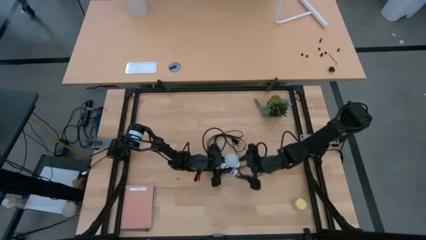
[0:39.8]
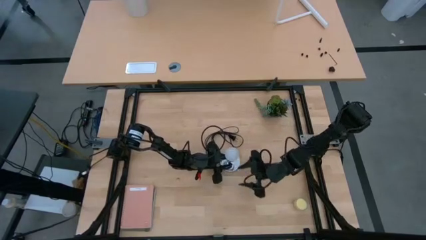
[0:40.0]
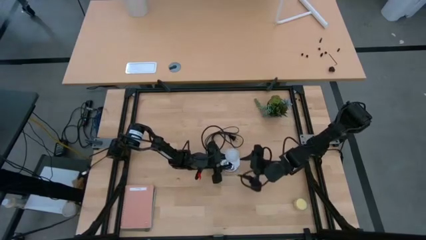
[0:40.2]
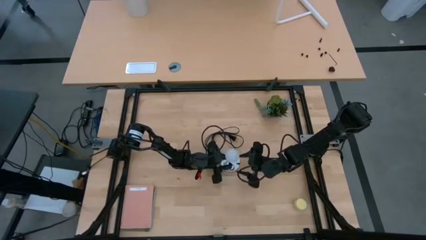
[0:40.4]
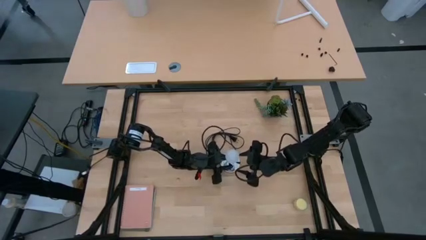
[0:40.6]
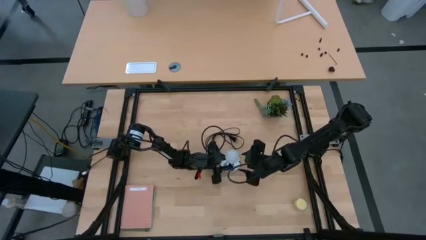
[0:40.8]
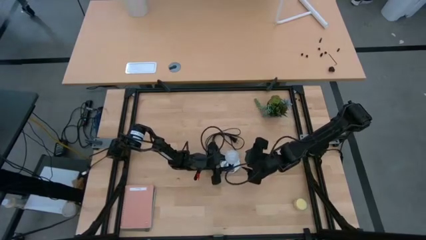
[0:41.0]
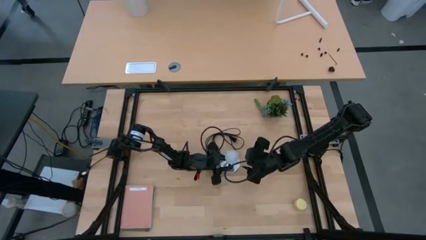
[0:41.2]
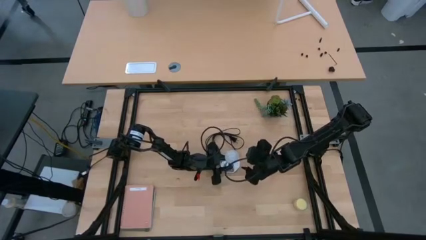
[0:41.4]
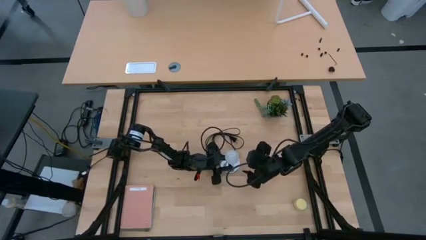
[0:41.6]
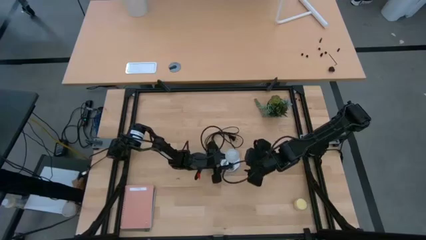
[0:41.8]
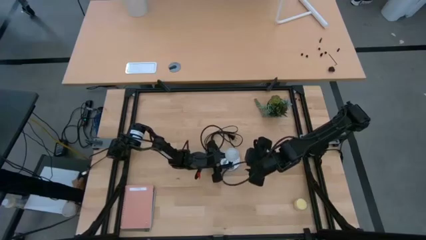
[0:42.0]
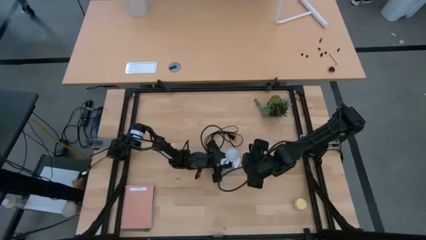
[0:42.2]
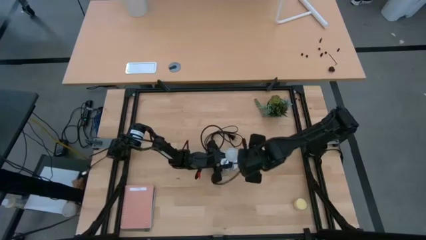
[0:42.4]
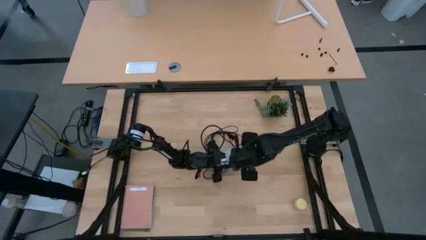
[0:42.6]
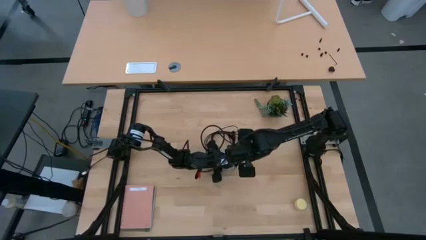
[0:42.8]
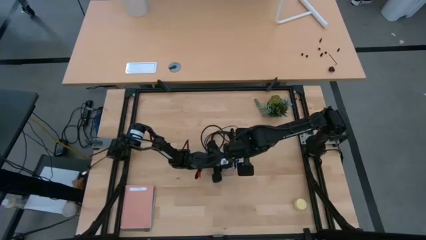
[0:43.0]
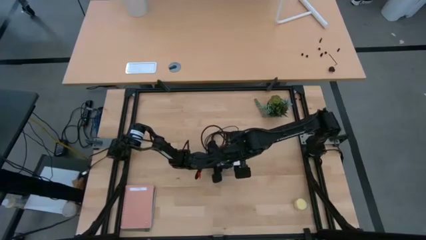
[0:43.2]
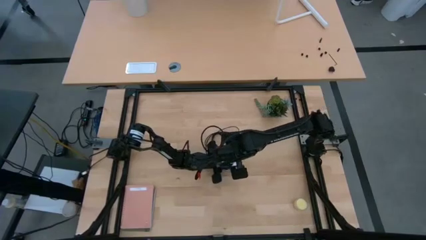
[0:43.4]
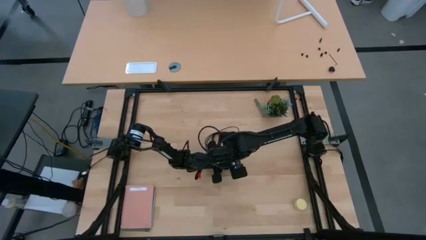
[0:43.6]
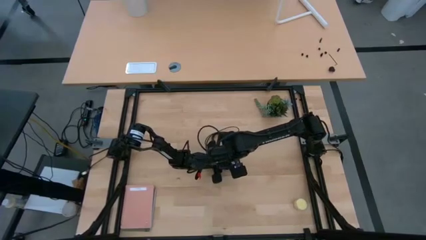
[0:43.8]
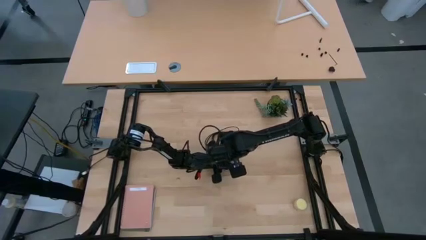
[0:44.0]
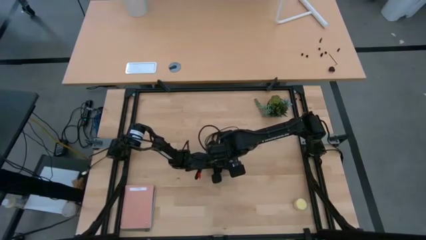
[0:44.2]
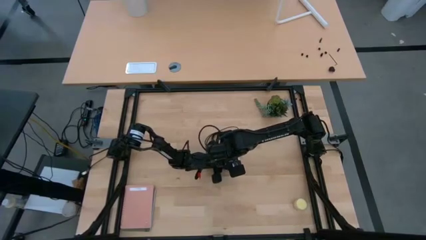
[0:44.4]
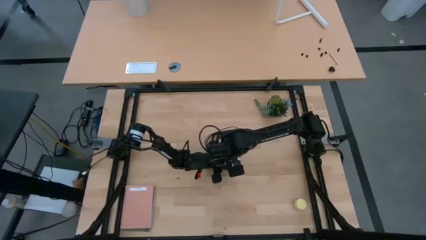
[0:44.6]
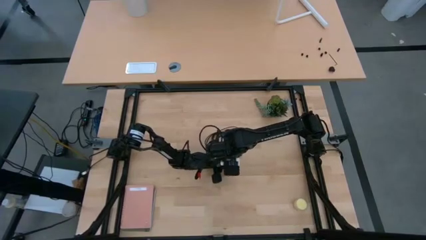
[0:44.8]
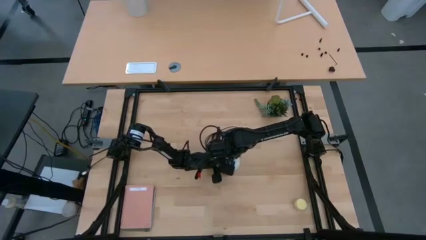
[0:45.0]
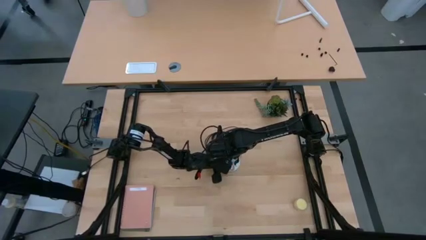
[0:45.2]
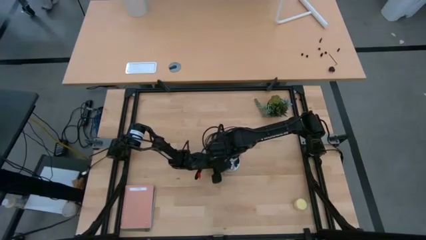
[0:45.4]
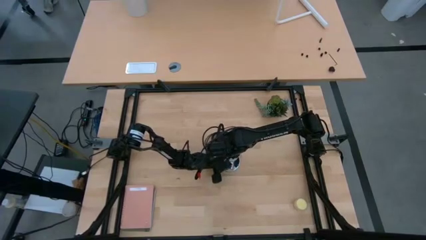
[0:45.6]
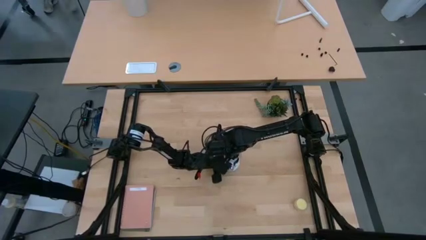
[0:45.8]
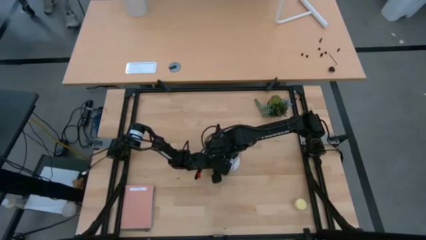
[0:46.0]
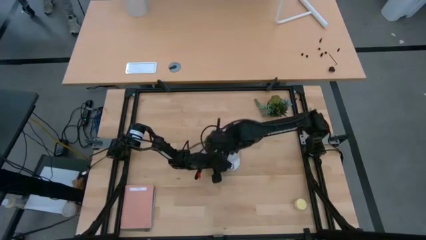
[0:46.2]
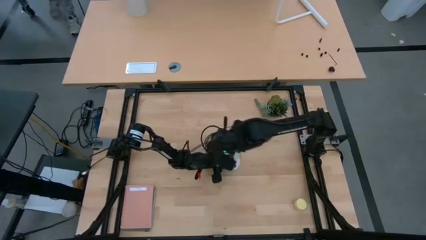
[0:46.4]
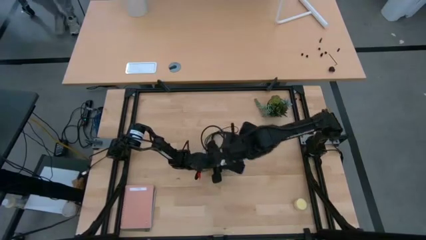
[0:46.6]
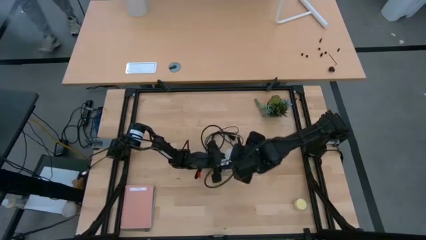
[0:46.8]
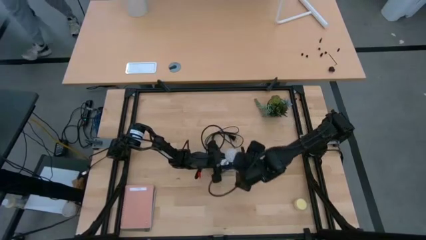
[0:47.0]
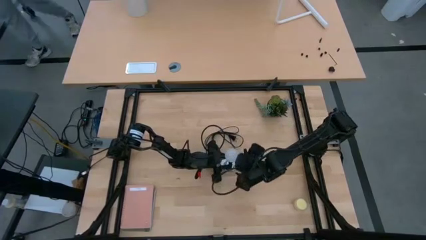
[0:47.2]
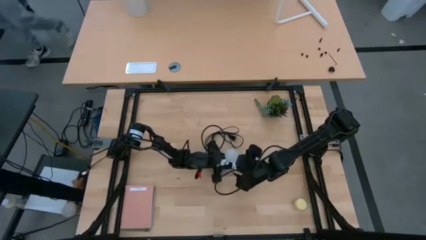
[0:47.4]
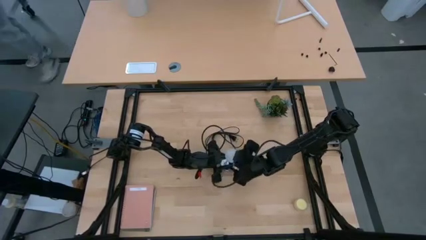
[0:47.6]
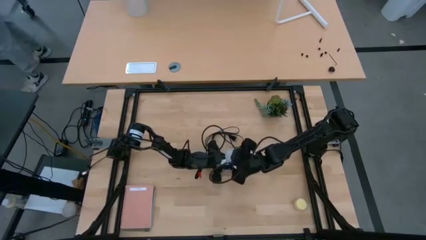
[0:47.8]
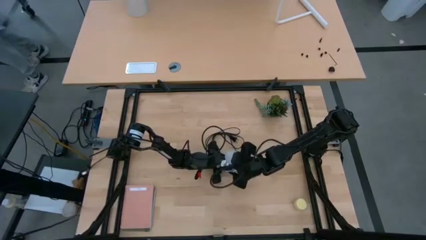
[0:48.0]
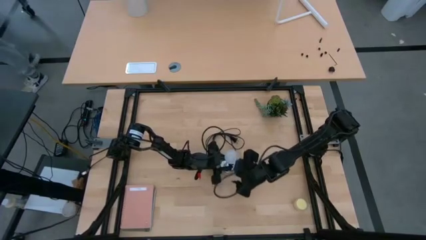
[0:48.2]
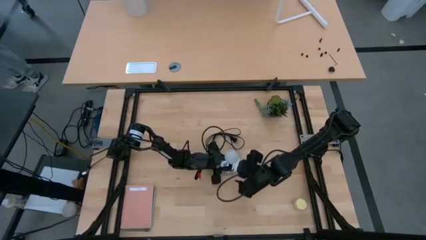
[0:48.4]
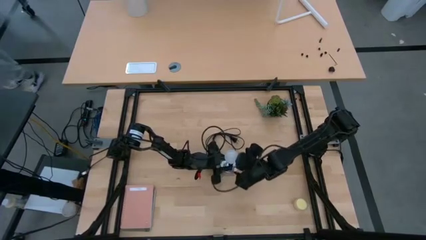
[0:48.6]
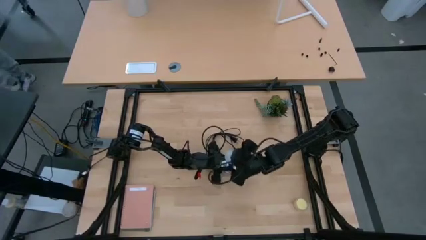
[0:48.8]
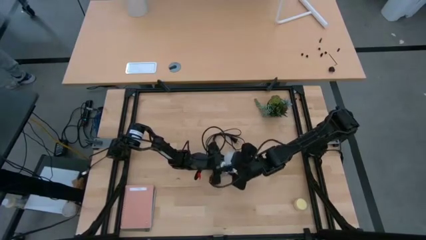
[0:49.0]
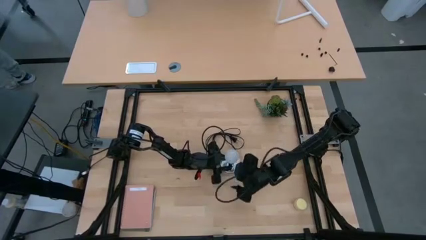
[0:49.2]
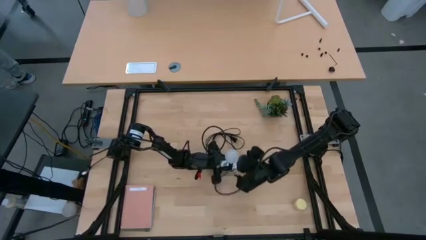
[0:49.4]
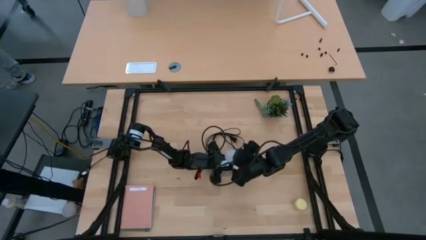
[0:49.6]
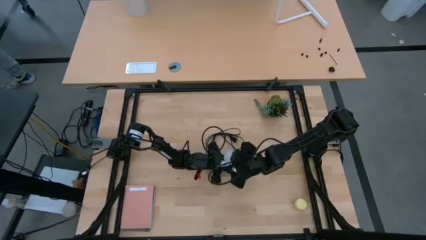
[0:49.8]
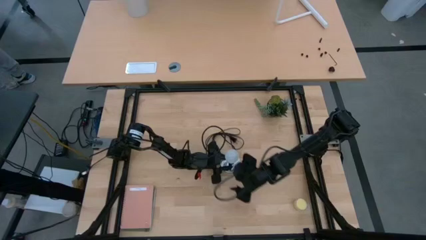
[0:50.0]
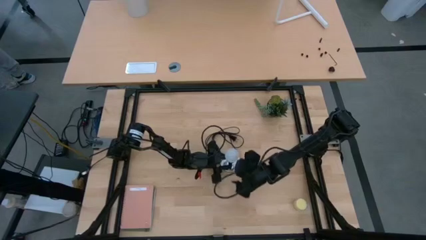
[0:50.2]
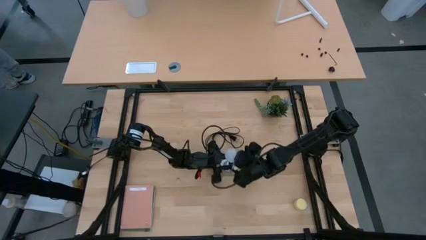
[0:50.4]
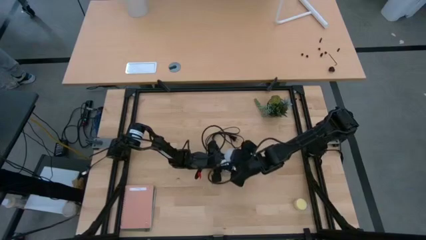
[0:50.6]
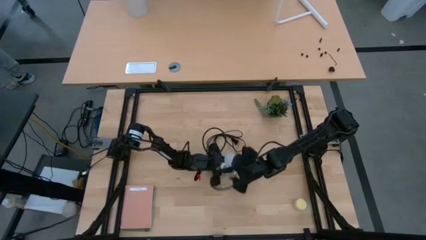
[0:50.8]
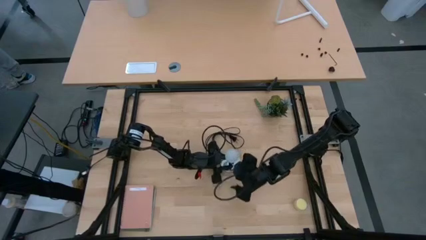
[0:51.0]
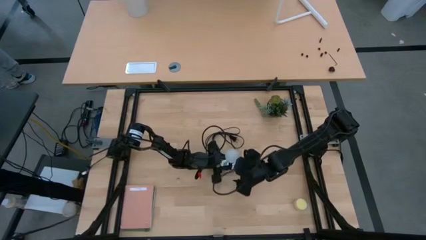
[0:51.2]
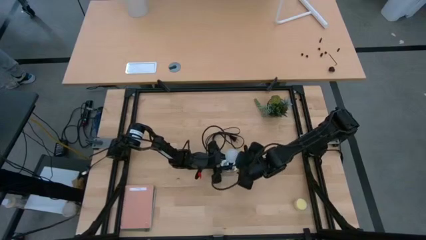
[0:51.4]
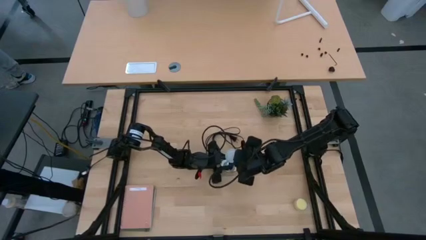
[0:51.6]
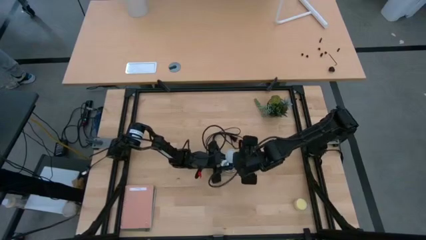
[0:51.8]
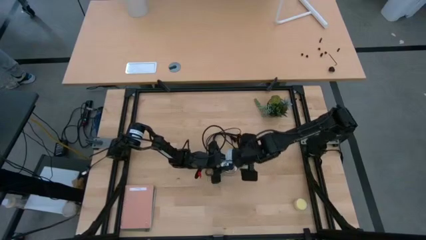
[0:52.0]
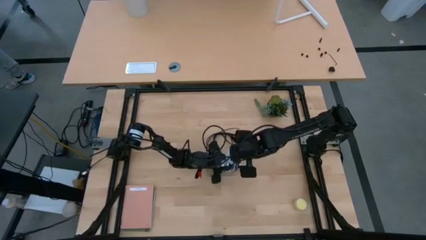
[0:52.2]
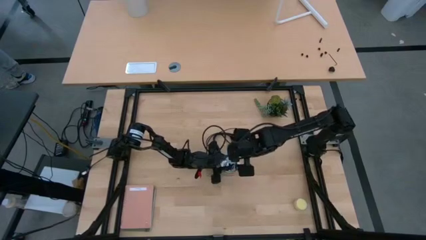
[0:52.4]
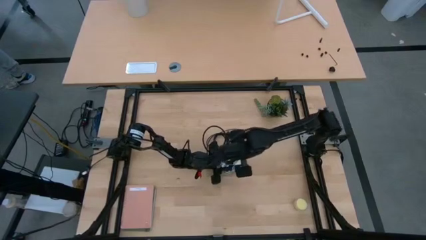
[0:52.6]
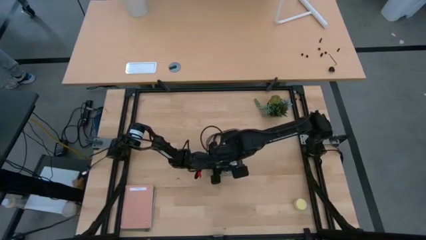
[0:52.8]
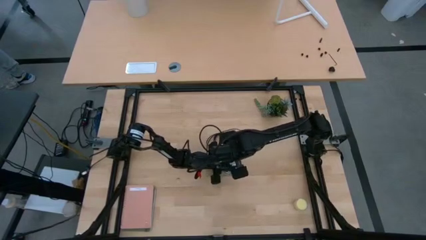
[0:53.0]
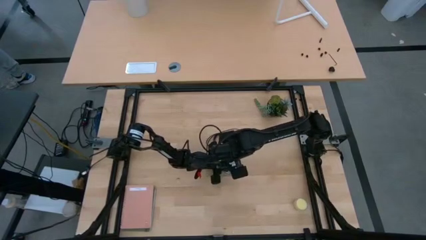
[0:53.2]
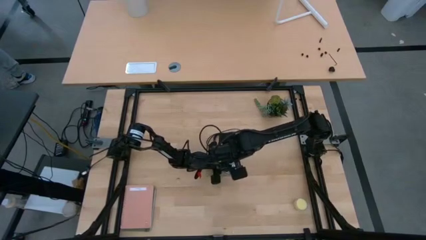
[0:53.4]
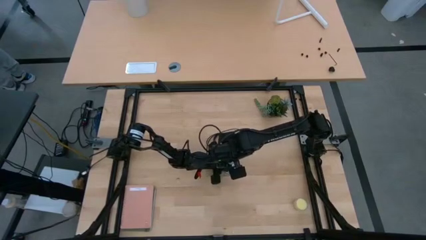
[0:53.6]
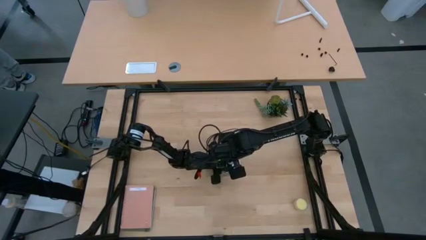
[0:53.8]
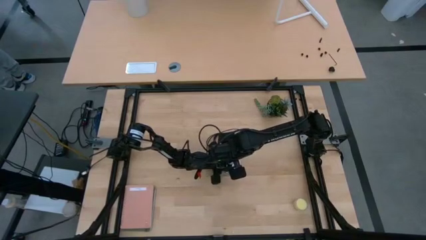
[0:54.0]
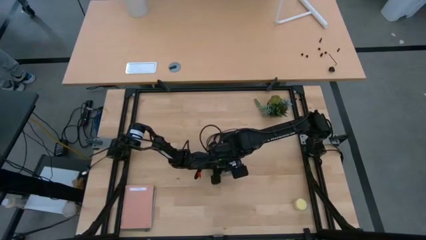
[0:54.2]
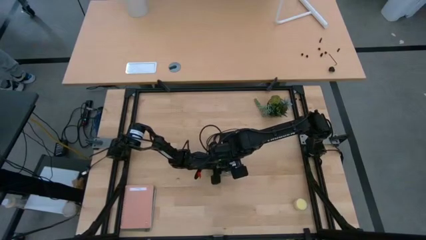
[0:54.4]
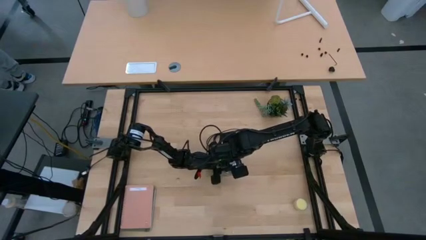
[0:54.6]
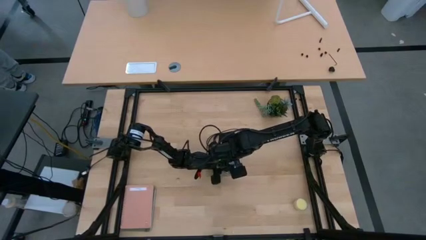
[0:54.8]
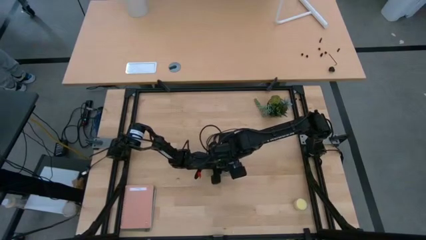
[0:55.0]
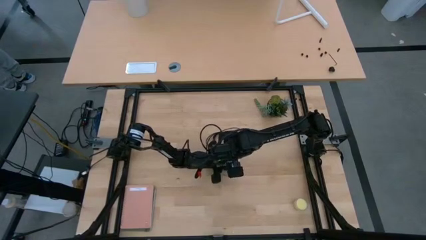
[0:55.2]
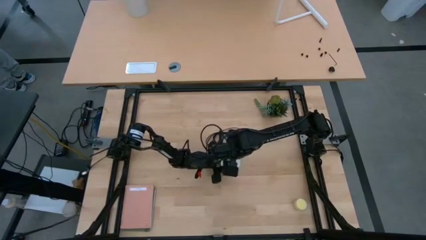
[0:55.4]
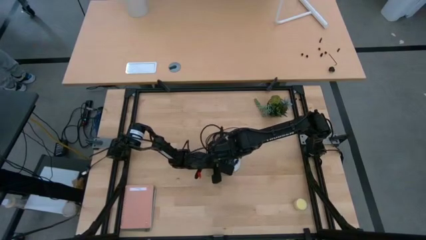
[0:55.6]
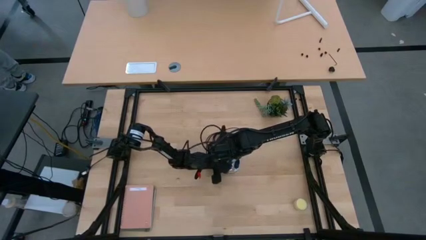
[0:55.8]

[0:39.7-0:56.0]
Task: Screw lightbulb
Insert the lightbulb into the lamp
